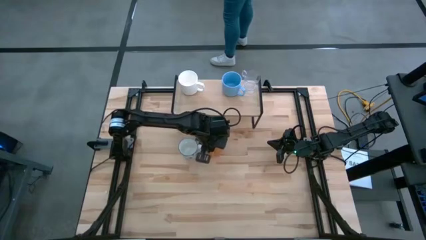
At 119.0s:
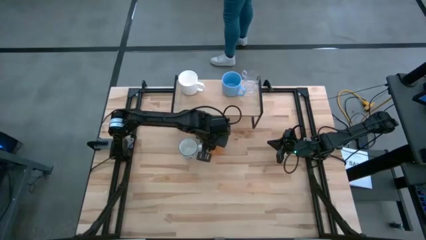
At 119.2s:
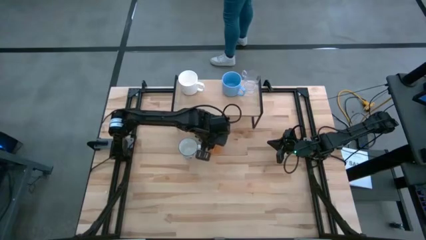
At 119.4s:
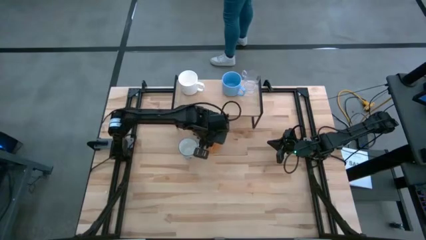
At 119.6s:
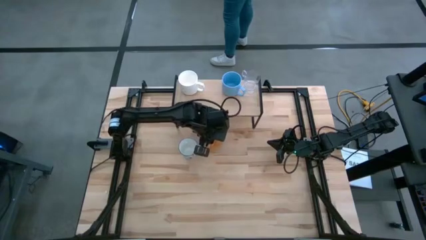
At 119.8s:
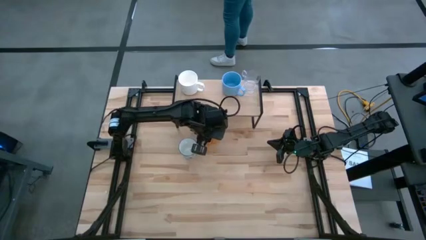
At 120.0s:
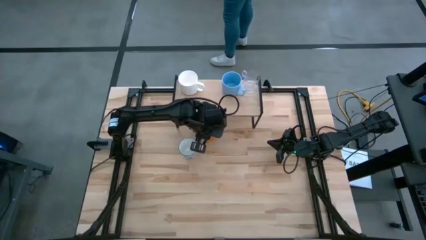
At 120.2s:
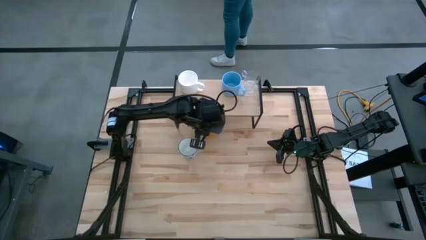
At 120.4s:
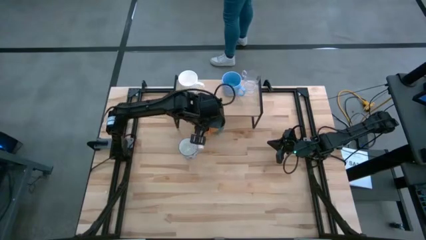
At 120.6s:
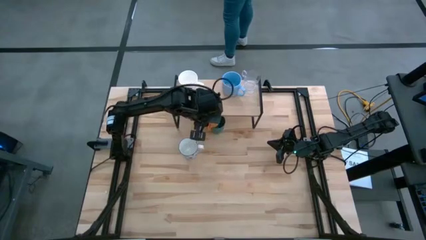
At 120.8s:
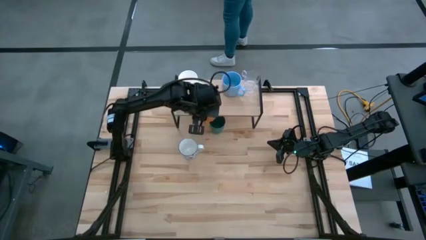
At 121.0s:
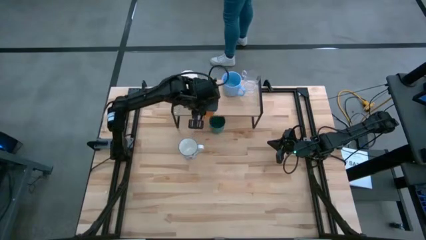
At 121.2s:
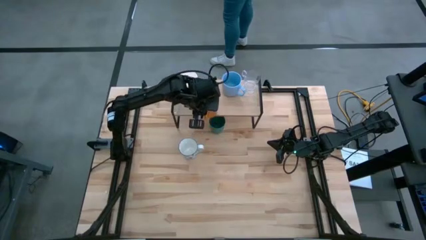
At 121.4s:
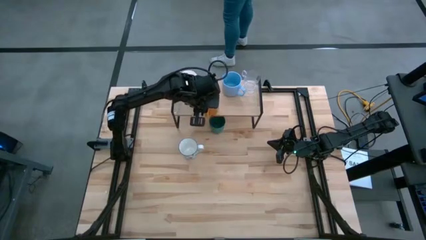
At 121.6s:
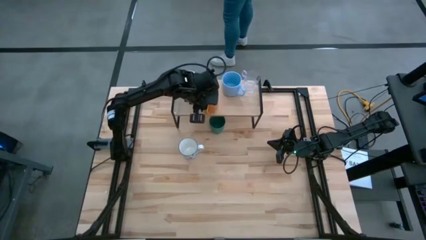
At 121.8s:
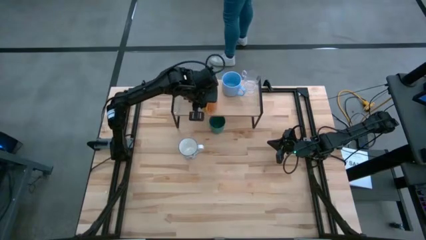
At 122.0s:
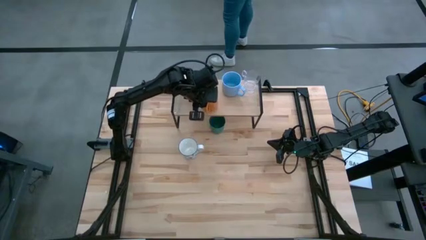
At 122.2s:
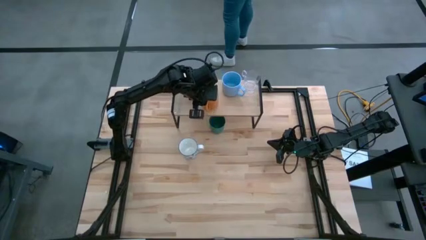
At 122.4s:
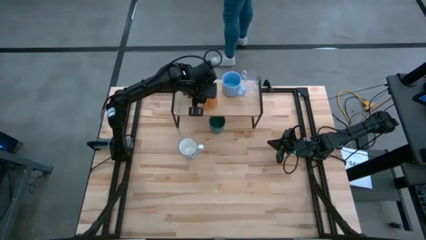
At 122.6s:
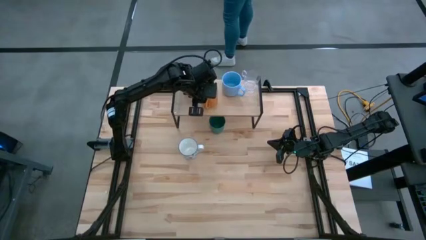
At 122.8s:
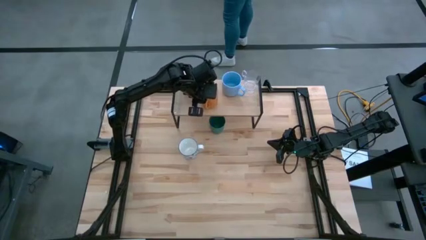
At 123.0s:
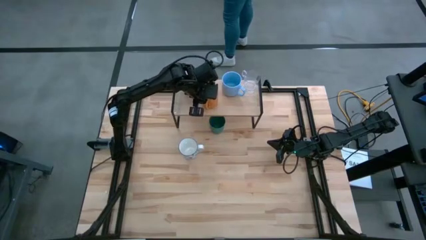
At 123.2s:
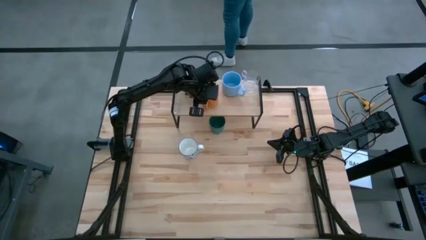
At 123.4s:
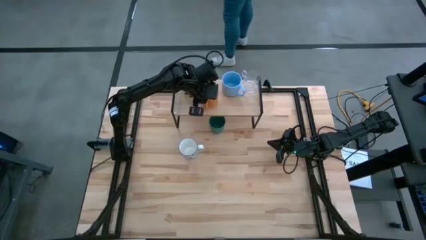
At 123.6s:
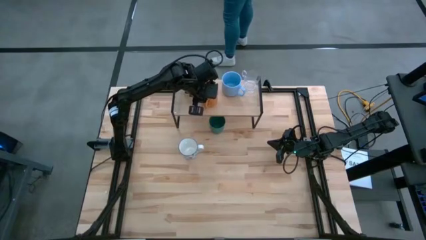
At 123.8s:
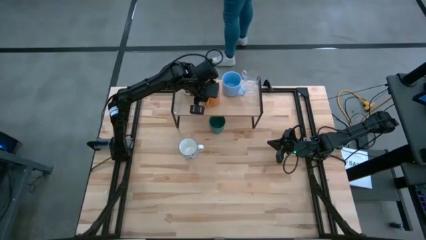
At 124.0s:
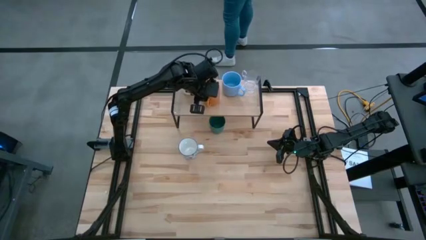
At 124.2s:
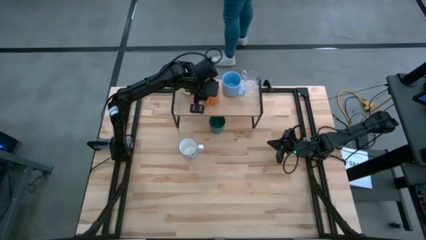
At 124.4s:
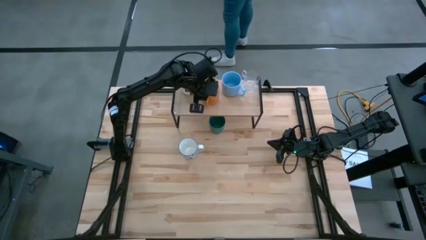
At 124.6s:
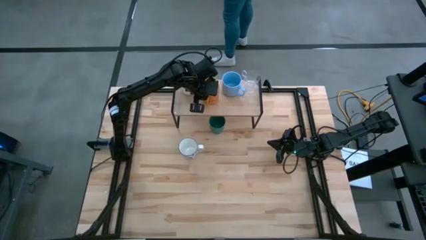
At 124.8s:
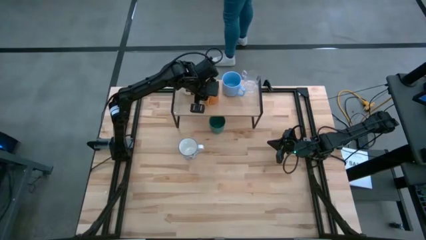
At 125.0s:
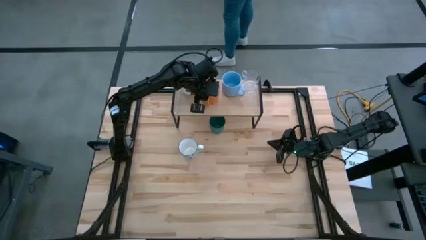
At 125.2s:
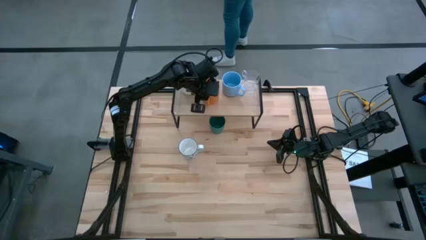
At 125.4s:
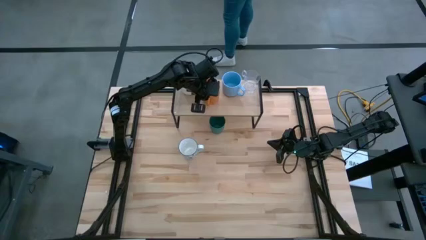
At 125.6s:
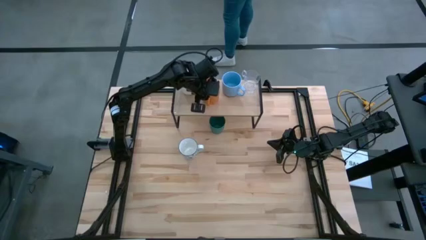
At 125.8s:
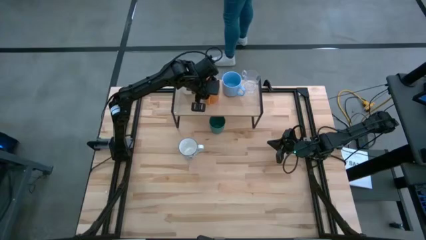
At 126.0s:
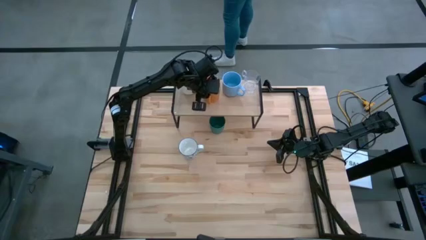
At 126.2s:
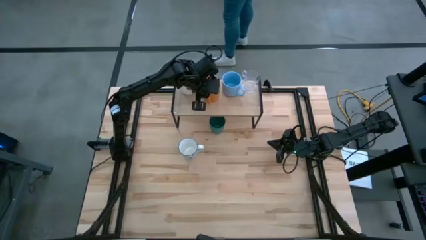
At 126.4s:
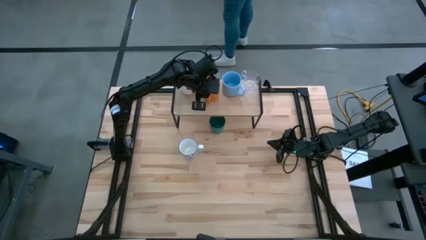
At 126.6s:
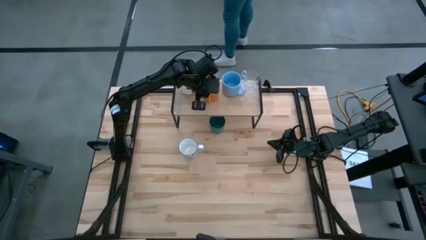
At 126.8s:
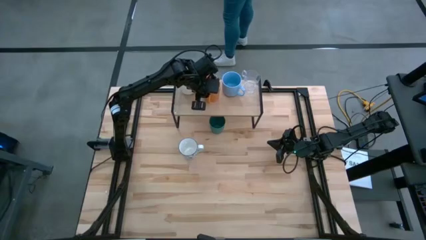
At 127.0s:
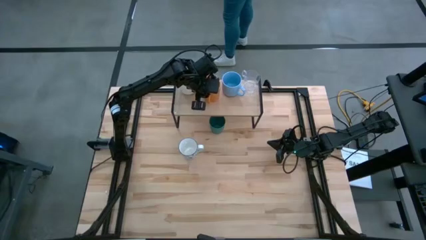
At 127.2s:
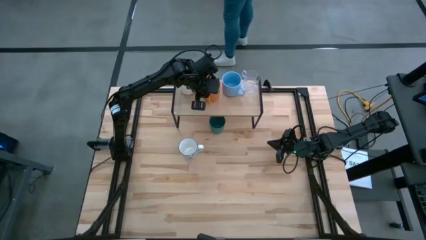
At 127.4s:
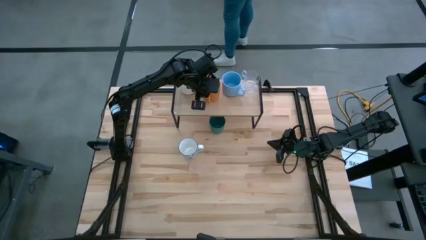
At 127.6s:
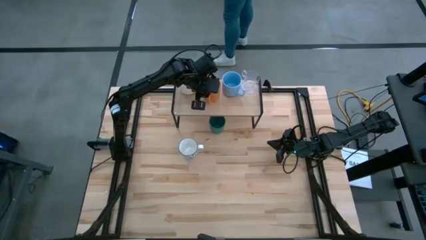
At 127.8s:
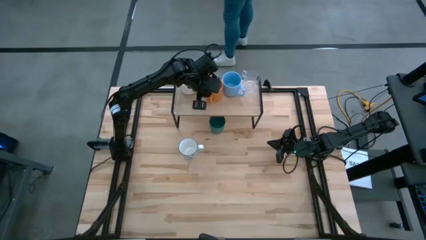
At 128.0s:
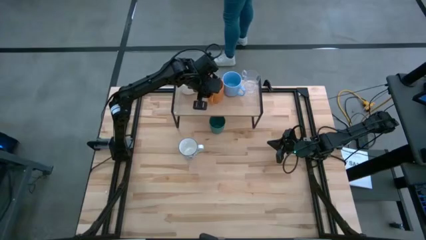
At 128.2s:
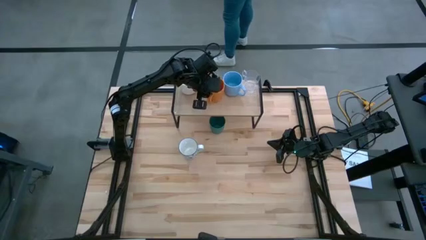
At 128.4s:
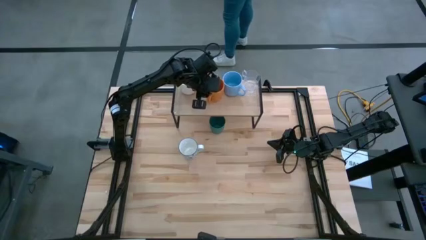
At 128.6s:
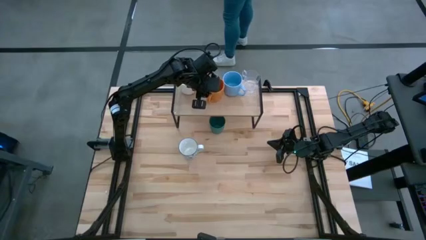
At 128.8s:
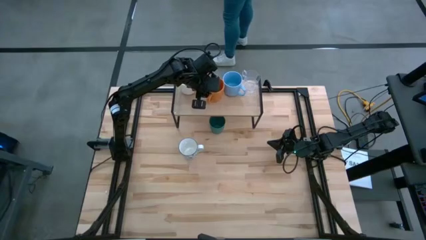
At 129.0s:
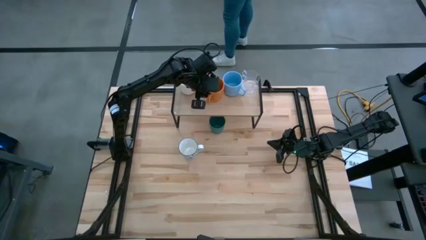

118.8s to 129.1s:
Task: Stack small to large cups/mugs on shelf
Put the orange mug on the shelf

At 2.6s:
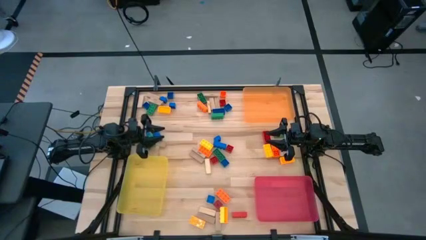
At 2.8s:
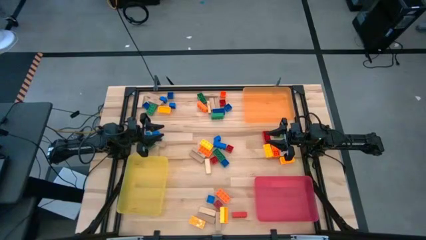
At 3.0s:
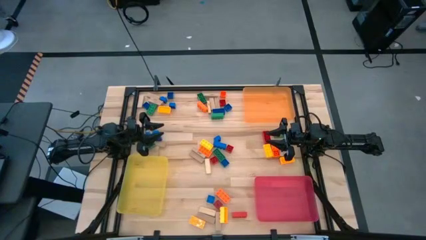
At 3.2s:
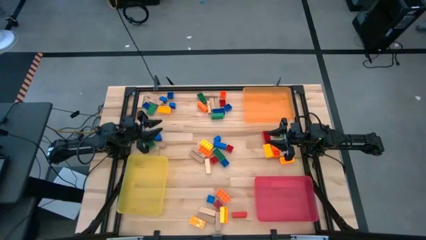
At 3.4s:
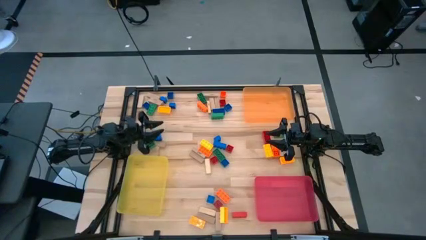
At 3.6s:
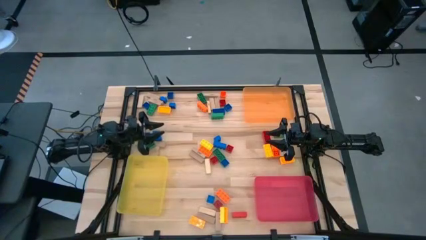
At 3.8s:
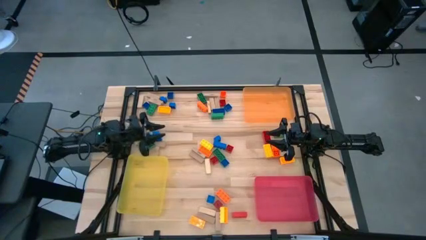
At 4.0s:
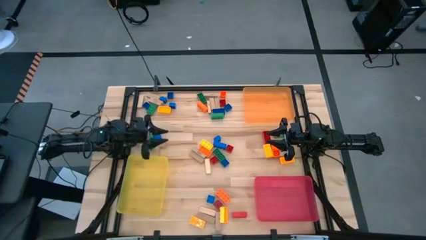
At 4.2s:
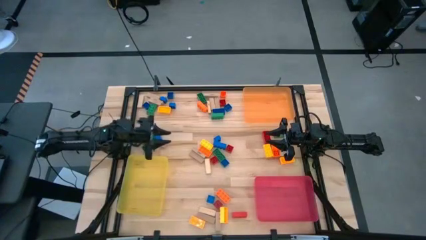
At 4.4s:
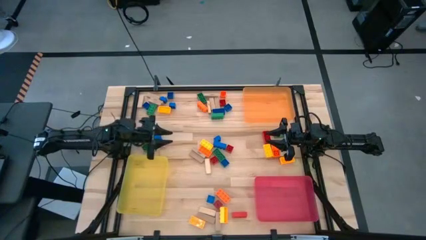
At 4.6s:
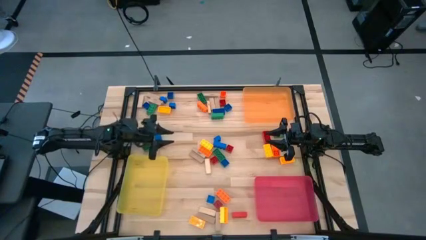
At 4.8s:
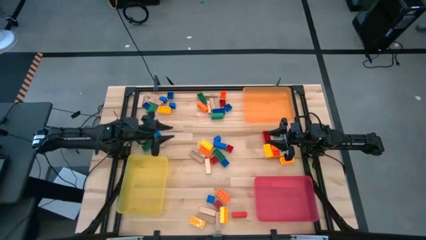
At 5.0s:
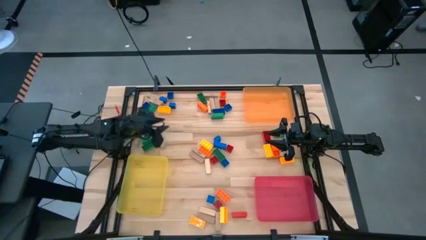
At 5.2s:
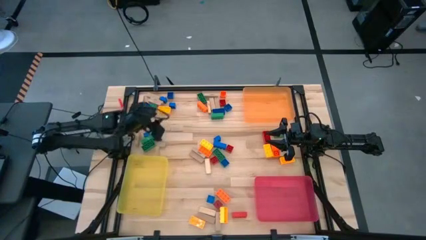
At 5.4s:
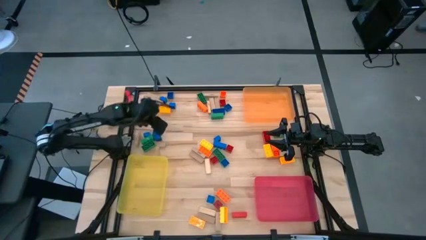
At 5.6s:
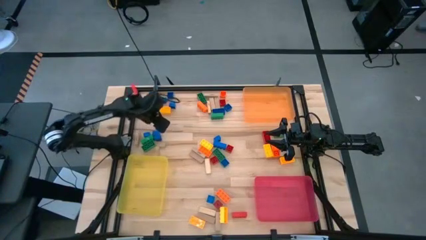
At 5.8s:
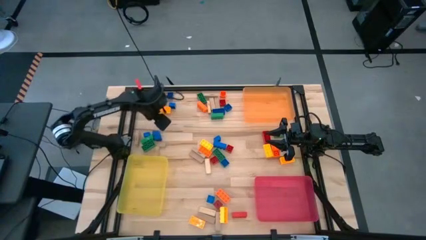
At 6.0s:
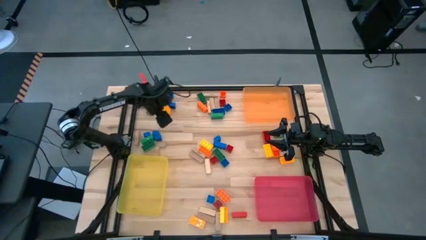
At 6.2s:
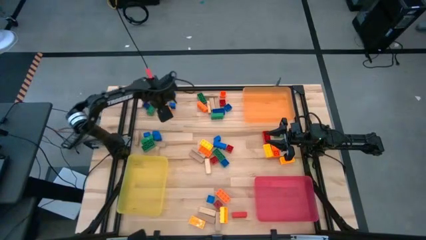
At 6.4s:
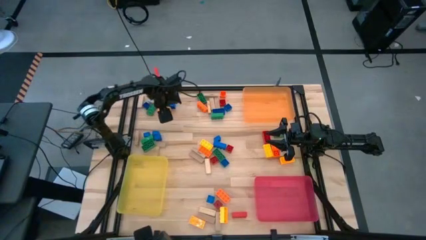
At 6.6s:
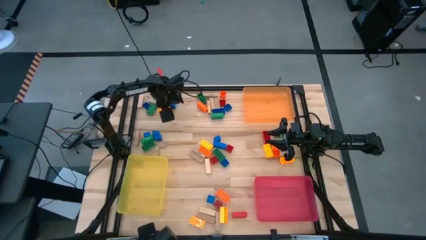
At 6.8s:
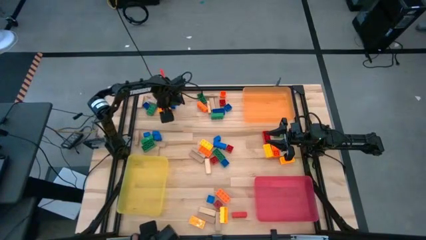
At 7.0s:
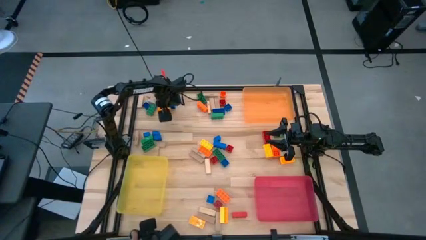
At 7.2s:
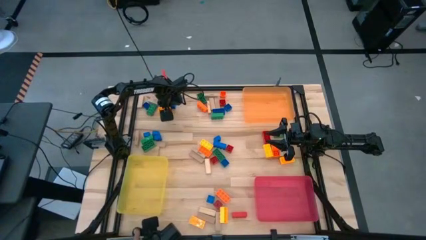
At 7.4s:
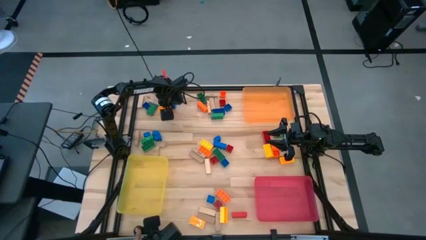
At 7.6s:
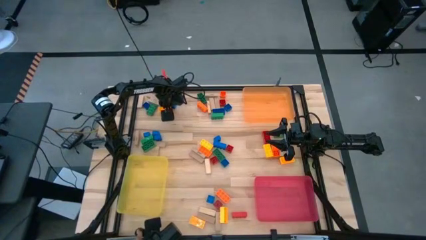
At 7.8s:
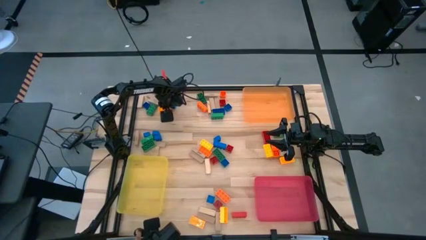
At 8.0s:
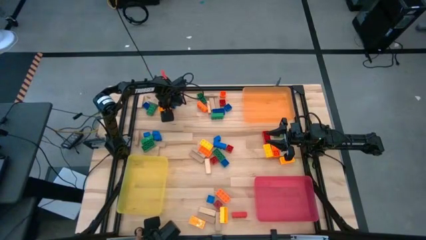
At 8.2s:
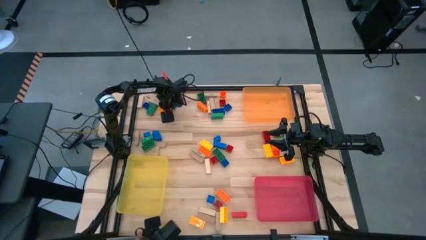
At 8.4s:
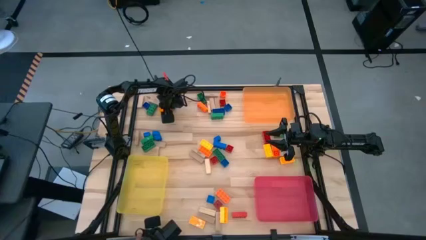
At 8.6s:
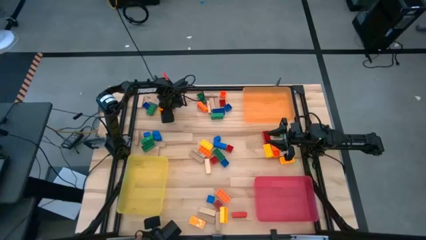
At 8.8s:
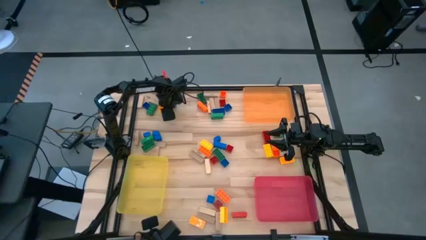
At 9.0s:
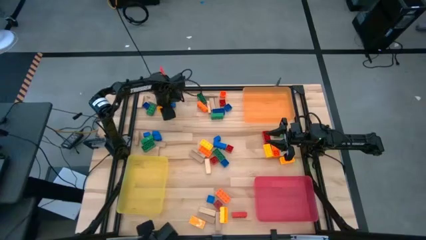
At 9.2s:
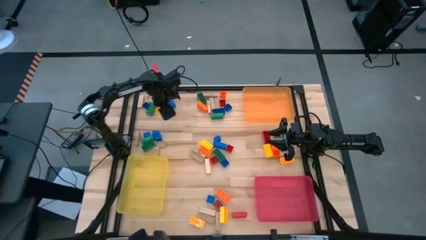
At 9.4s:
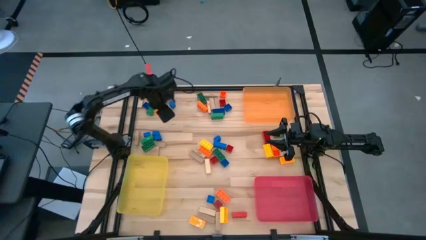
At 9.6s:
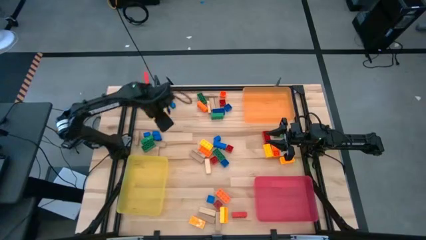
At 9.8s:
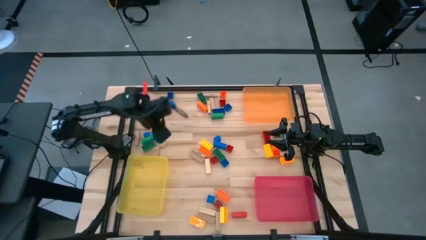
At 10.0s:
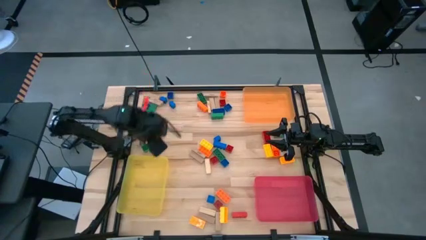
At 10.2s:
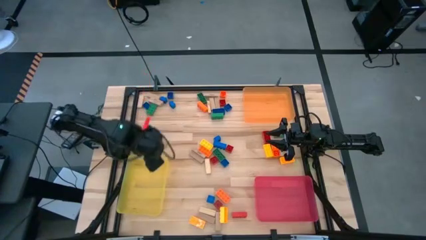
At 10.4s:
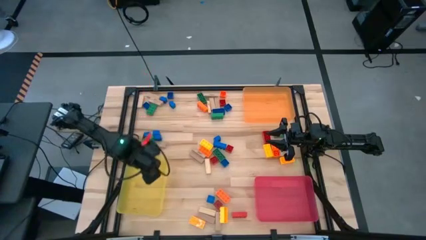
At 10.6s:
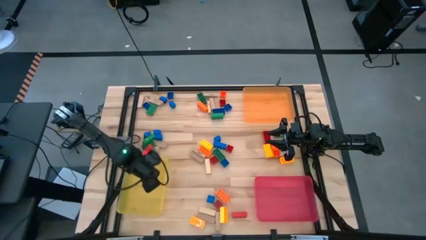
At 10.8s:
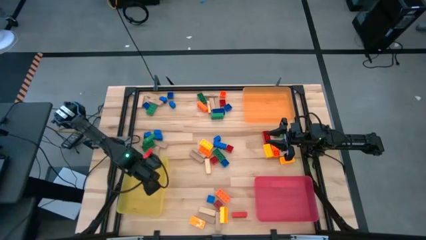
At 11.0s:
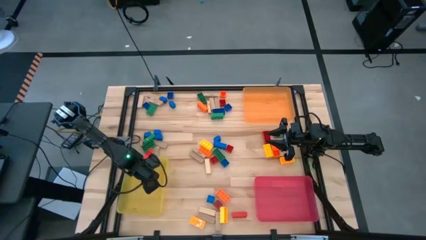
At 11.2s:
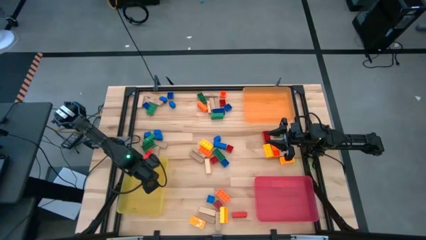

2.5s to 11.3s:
Task: Sort blocks by size
Put the large yellow game piece into the yellow bin
